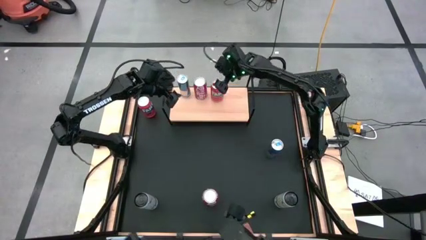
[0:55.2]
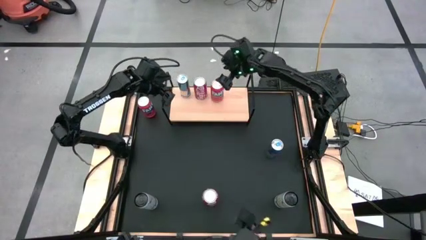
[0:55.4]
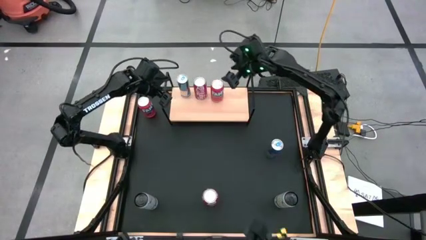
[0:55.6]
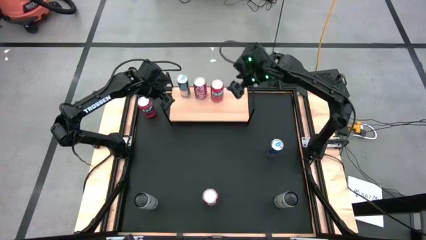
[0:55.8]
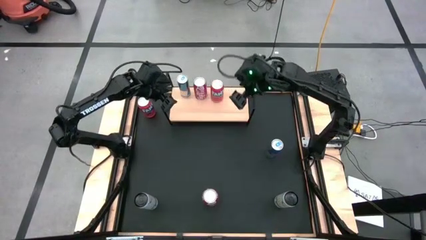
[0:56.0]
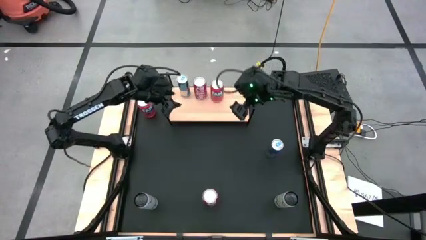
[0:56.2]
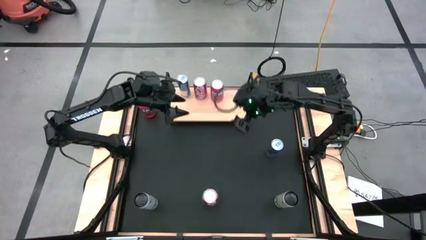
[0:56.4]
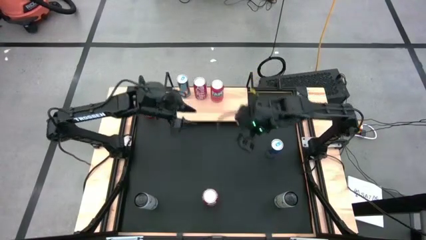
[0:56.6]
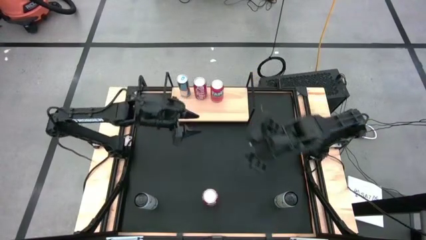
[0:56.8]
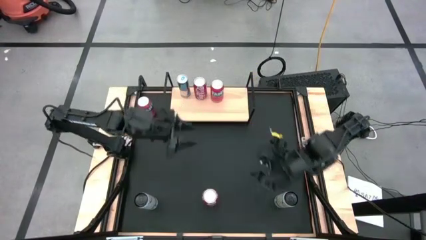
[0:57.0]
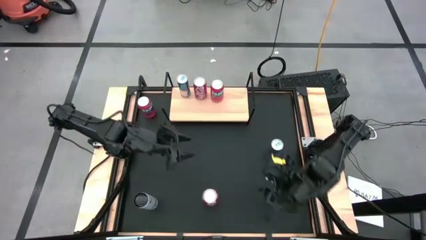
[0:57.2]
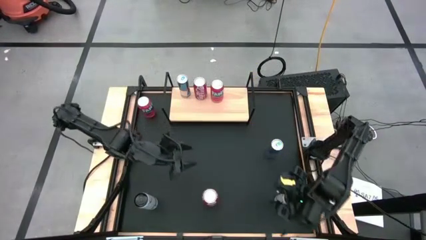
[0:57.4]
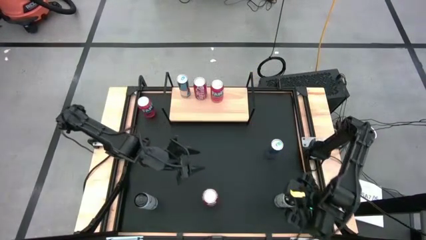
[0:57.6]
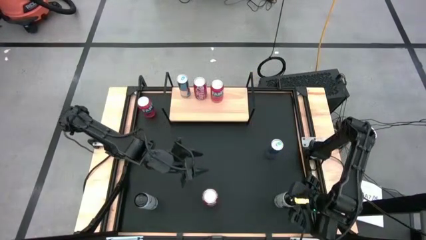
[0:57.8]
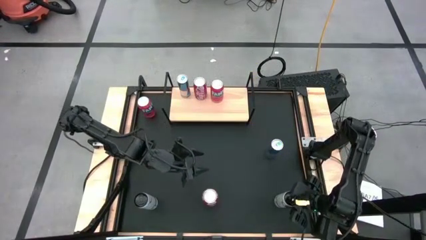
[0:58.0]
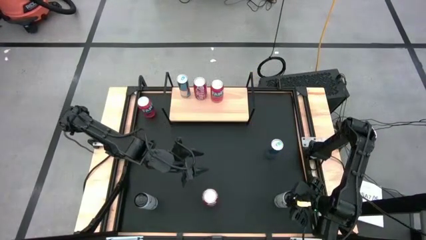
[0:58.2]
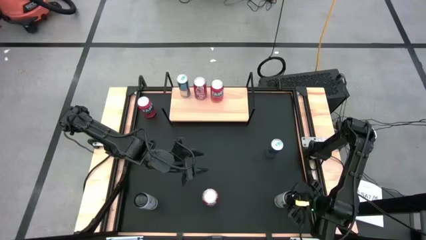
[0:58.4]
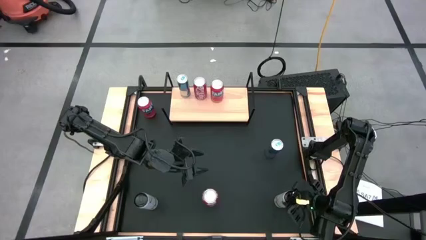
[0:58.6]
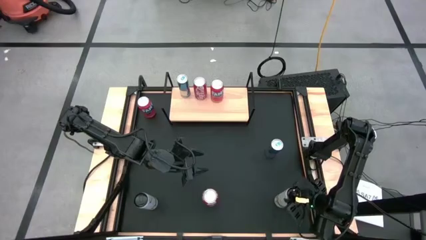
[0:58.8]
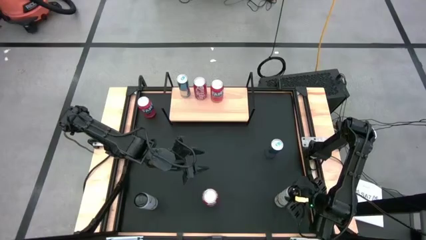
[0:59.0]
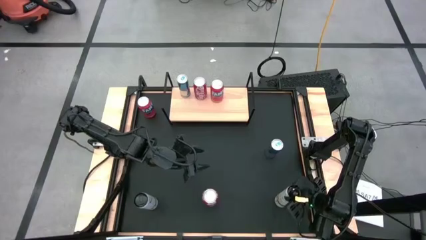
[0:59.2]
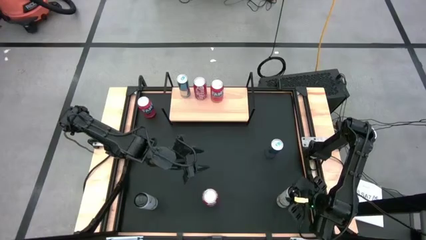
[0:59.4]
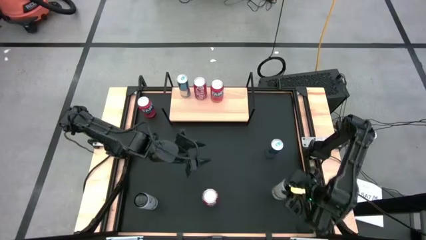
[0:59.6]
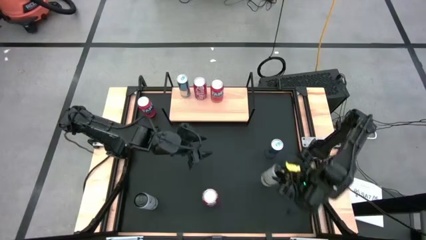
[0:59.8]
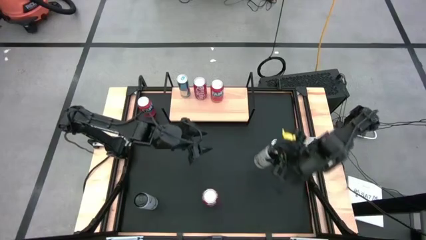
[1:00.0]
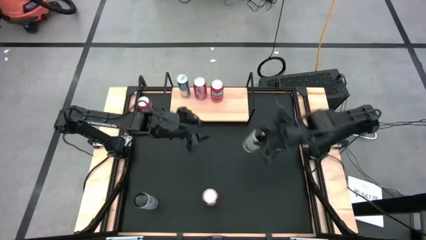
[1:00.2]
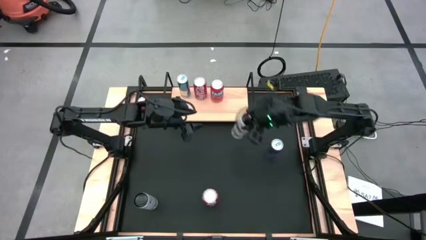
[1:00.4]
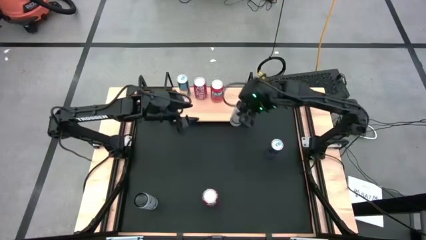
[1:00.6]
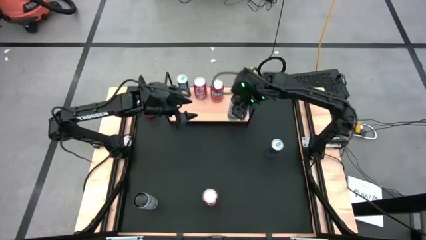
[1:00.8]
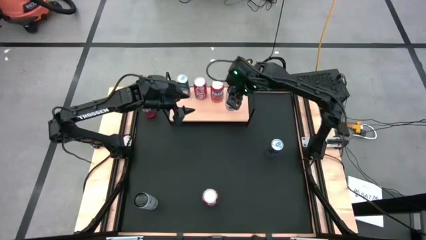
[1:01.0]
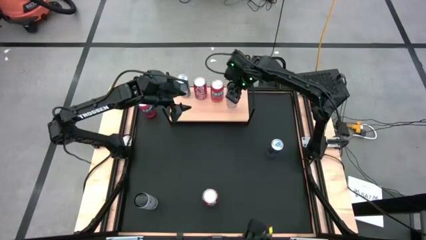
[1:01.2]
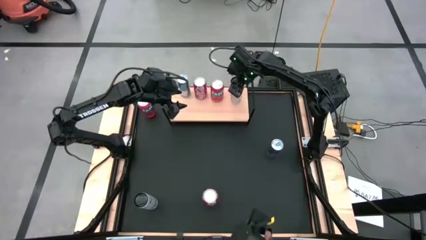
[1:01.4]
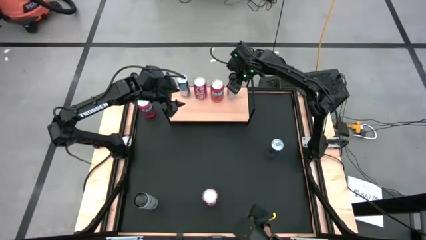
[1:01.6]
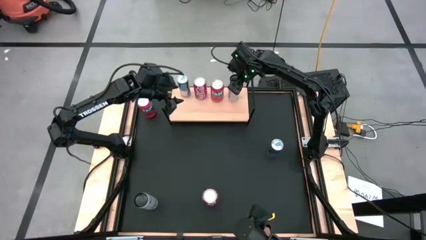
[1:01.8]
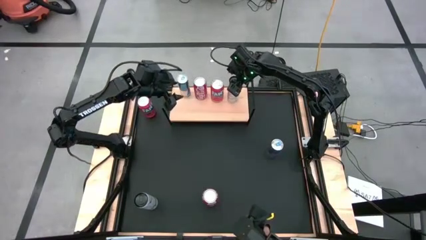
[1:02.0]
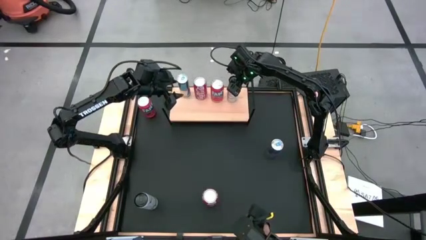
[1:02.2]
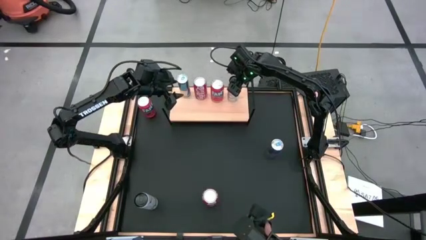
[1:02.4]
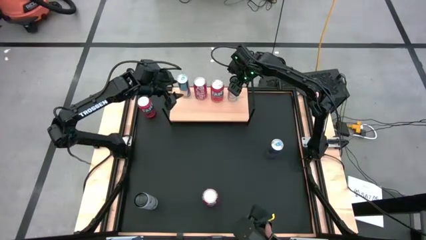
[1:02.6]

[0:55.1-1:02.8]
Task: Place canned beverage on shelf
Put the white-yellow soda can on the shelf

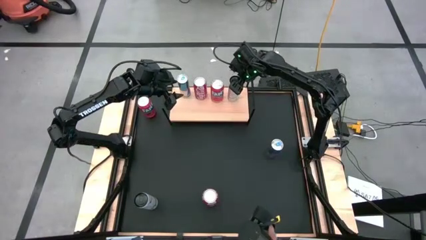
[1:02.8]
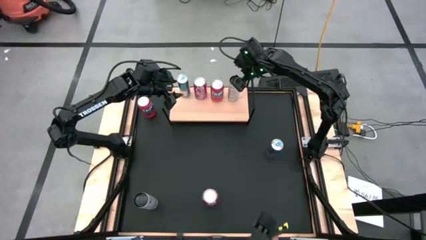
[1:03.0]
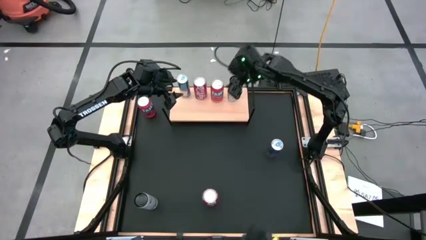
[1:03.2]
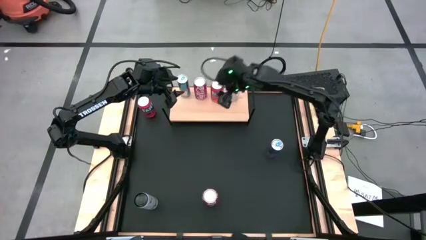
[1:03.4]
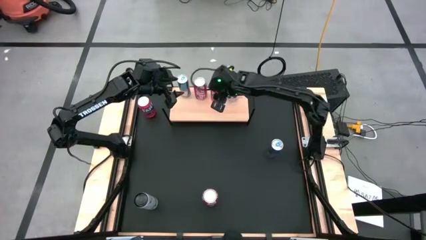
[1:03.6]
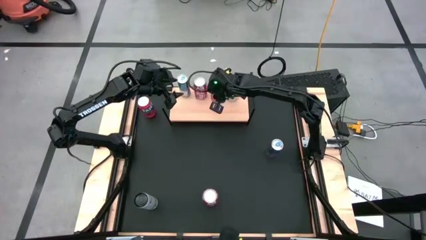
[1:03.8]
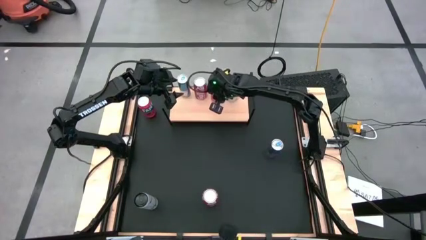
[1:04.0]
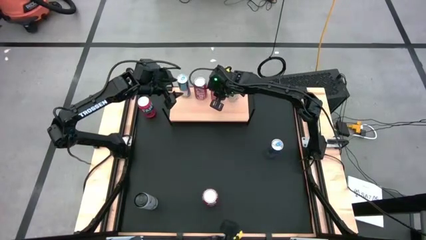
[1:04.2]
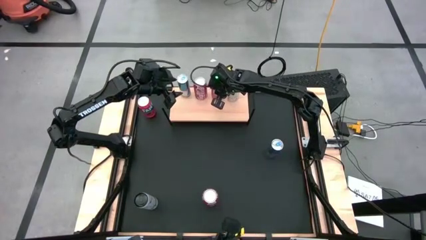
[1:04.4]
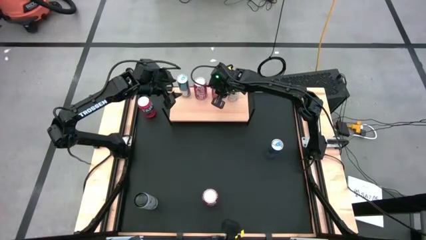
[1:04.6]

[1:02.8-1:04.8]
Adjust the red soda can on the shelf

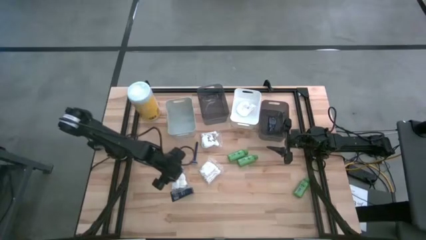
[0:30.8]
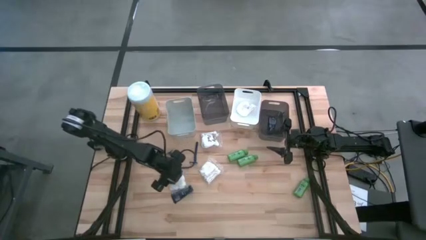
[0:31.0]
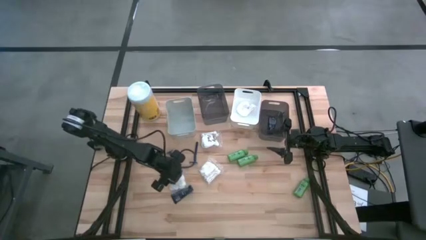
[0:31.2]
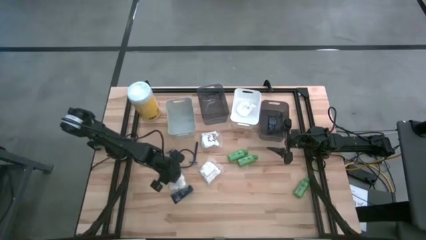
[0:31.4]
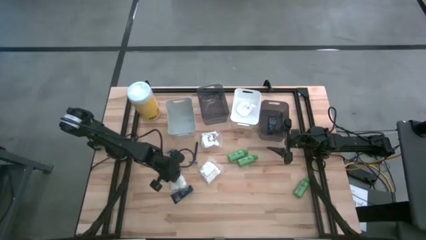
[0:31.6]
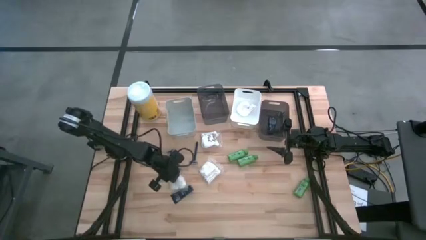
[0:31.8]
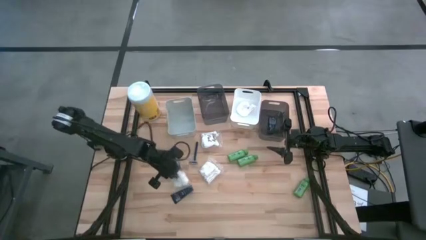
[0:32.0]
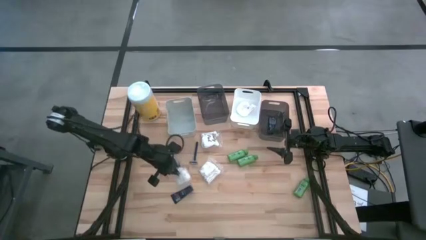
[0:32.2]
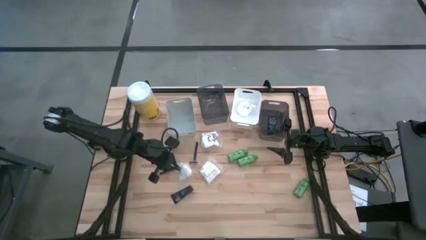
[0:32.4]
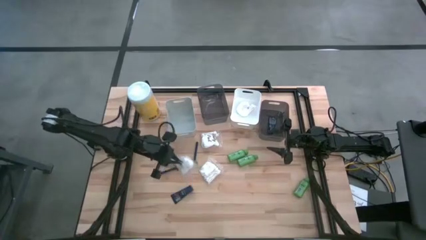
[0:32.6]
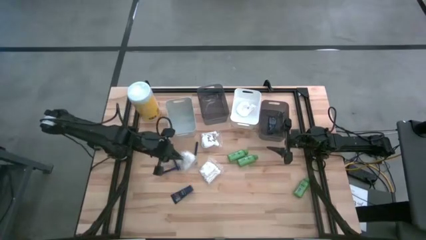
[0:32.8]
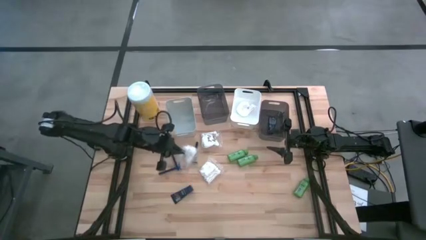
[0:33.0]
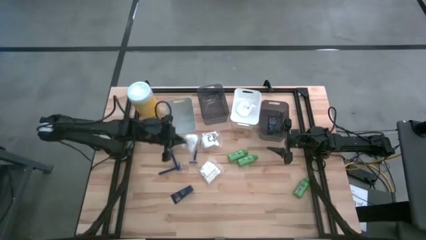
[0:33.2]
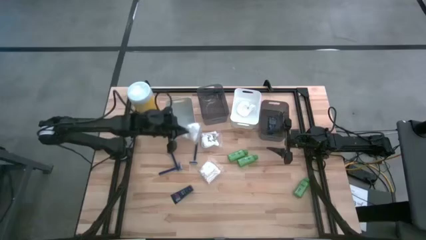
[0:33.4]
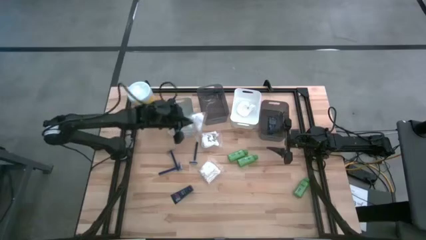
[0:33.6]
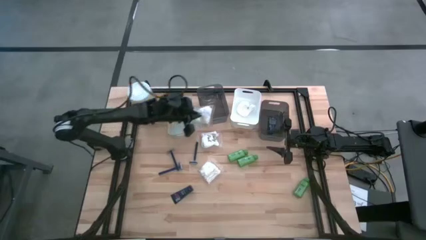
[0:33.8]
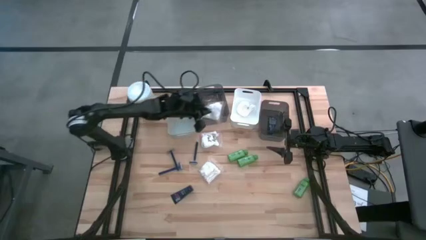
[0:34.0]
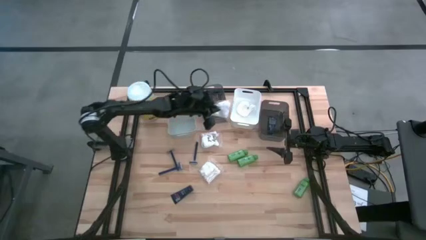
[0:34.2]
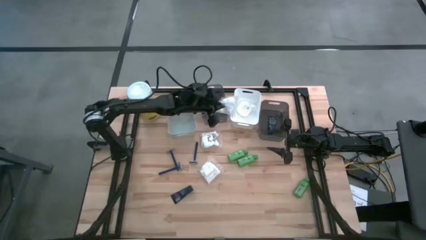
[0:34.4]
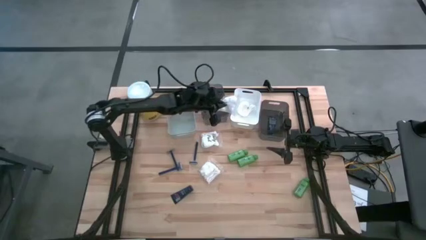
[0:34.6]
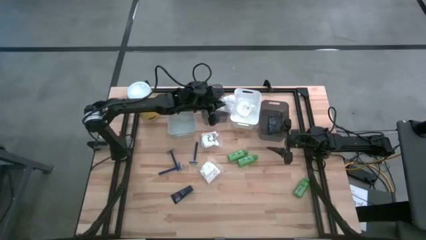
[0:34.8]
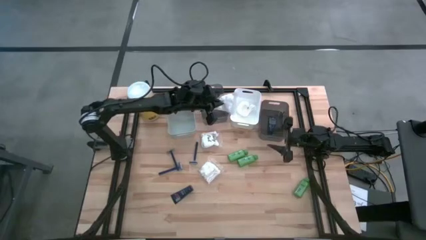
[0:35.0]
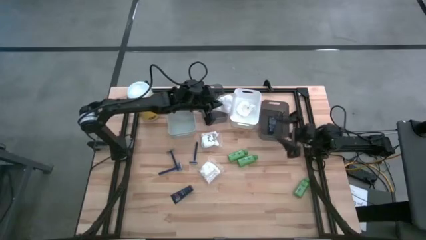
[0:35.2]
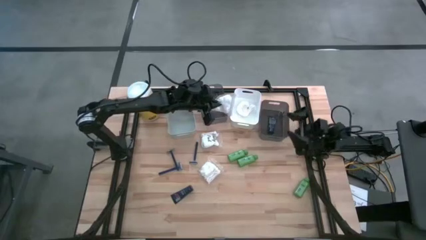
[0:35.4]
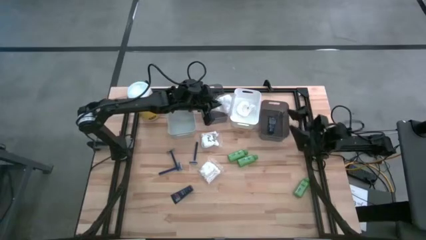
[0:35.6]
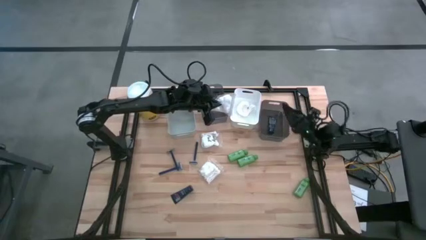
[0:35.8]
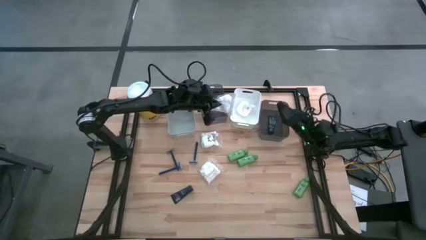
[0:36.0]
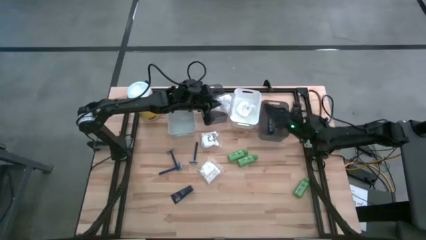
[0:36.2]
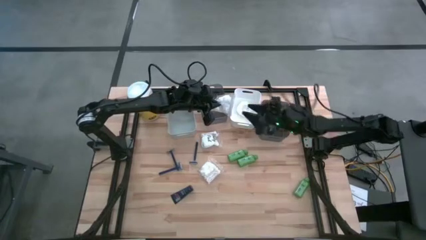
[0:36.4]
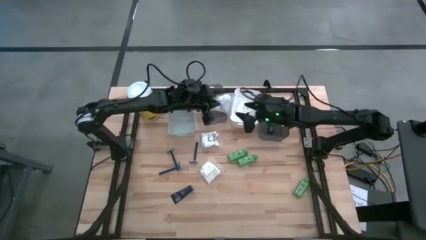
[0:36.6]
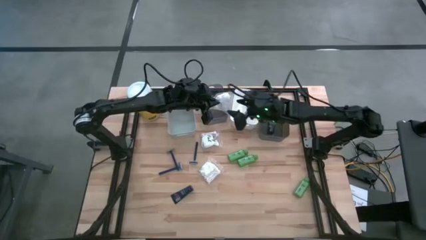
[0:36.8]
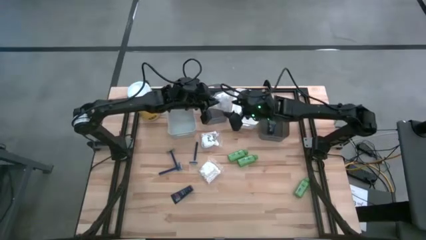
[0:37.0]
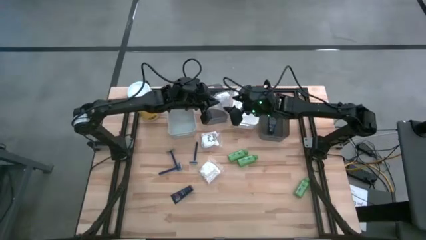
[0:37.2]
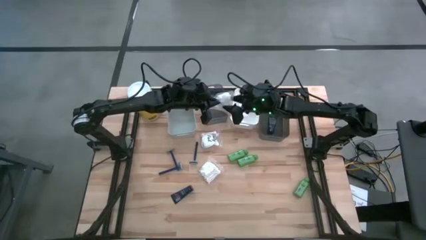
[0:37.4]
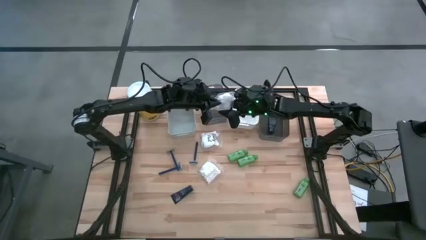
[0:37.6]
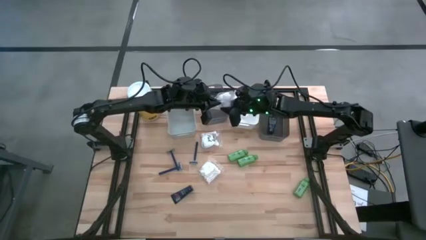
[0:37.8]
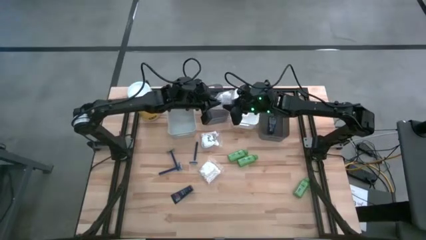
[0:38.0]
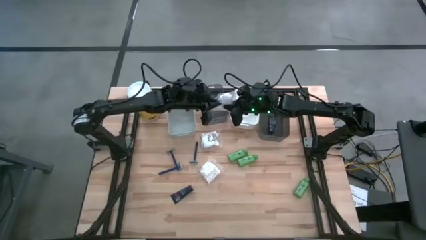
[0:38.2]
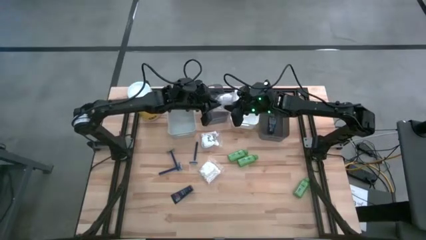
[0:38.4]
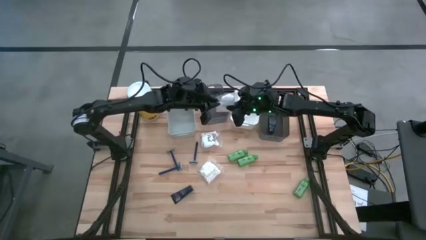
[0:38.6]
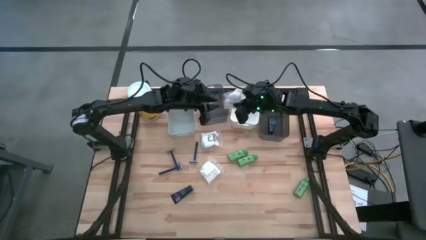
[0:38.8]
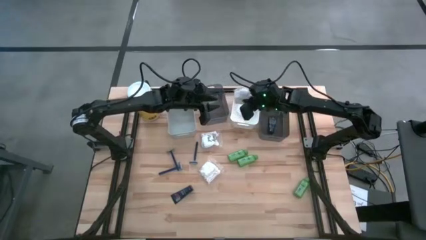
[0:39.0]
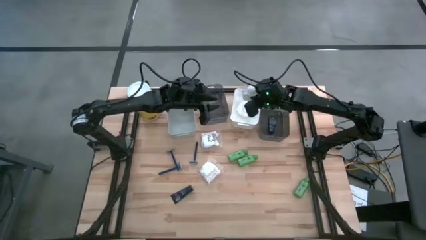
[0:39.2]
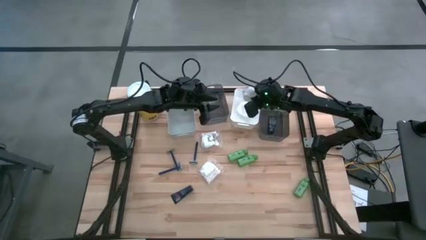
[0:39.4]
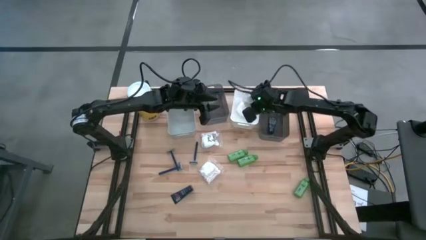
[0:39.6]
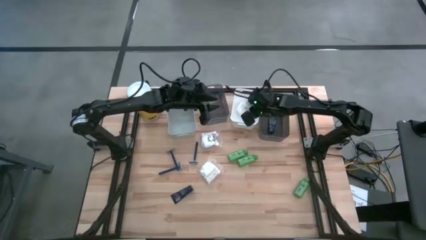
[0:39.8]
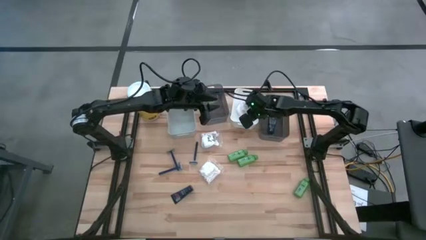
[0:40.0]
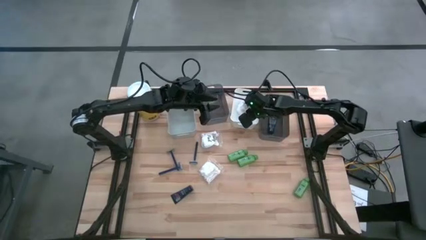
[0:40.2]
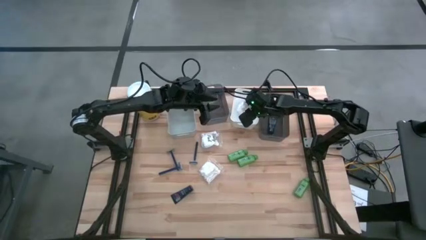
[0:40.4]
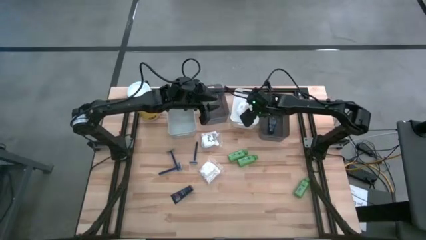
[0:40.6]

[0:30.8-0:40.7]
Task: Pick & Place Travel size toiletries
Put the white cotton pack into the white bin
